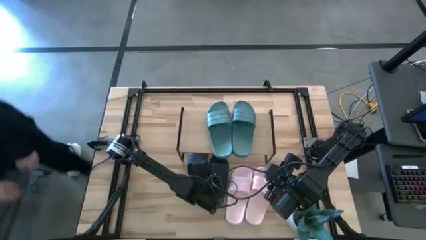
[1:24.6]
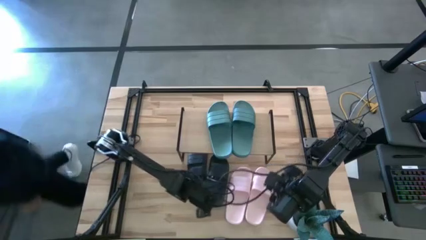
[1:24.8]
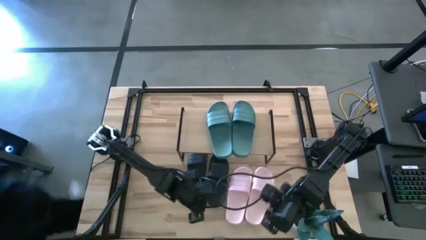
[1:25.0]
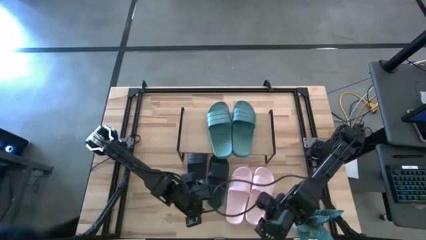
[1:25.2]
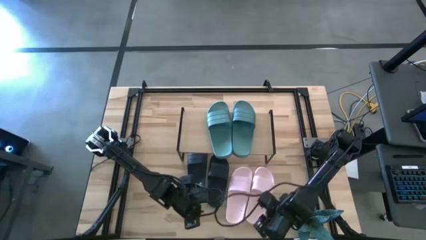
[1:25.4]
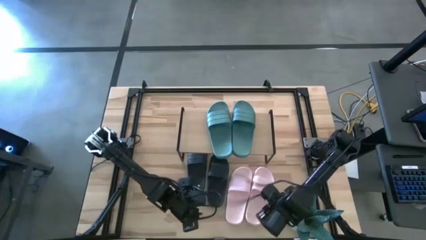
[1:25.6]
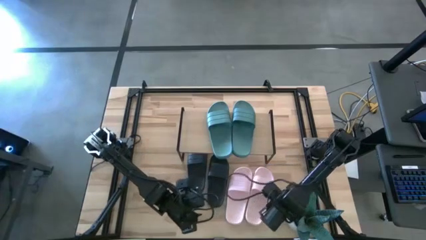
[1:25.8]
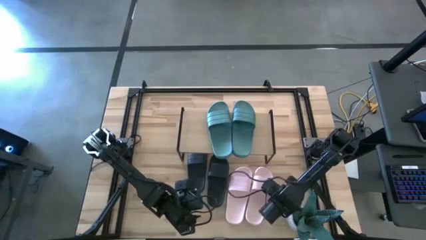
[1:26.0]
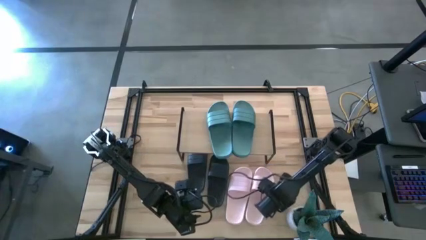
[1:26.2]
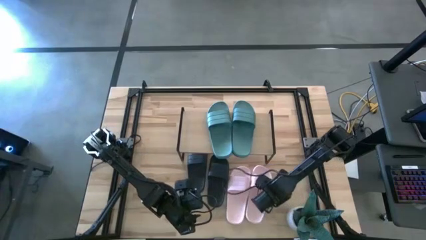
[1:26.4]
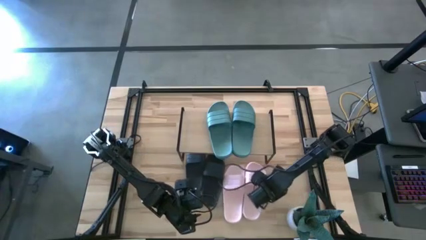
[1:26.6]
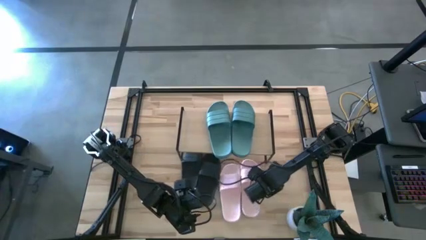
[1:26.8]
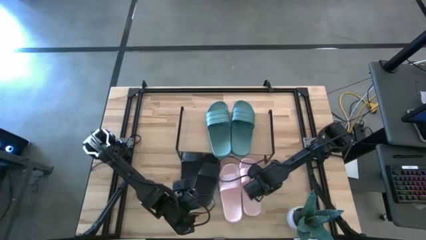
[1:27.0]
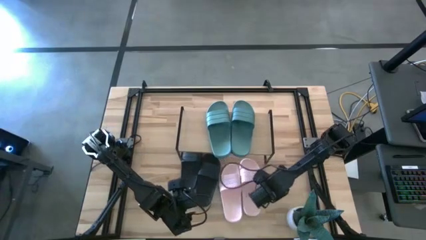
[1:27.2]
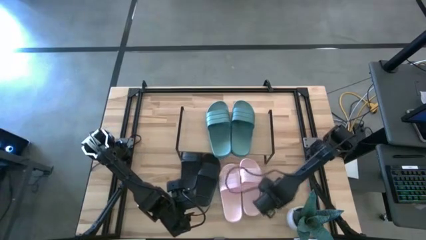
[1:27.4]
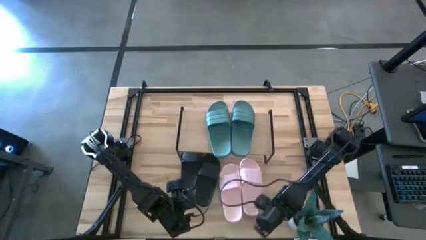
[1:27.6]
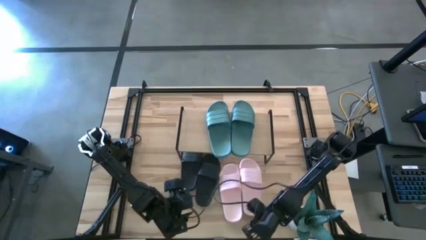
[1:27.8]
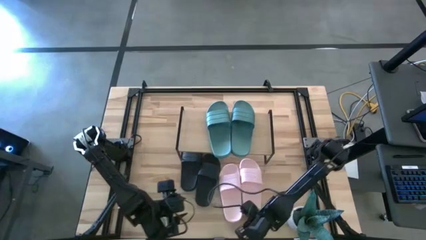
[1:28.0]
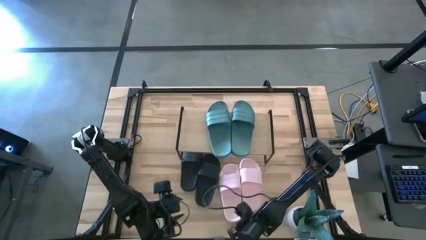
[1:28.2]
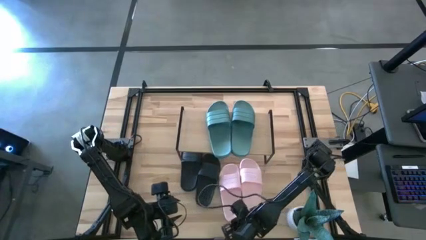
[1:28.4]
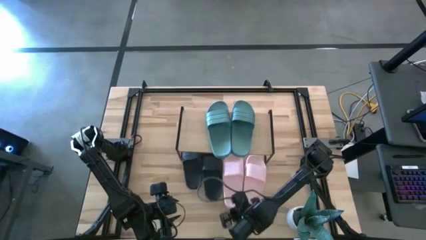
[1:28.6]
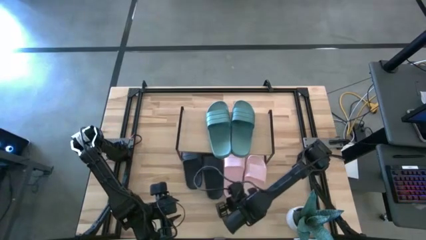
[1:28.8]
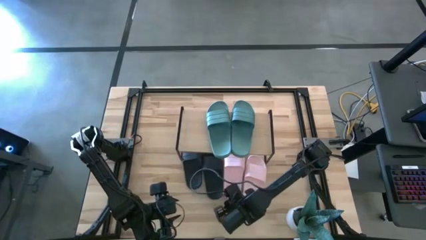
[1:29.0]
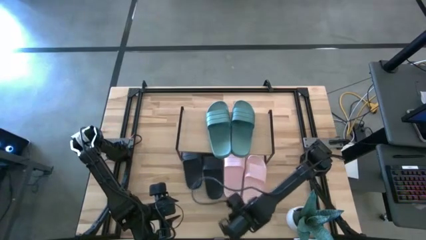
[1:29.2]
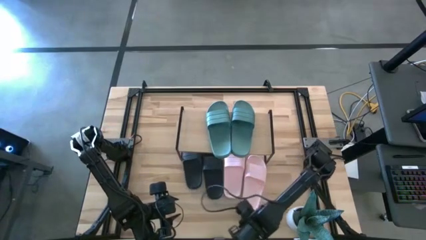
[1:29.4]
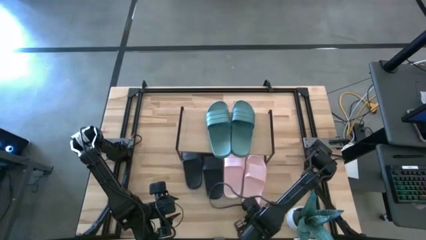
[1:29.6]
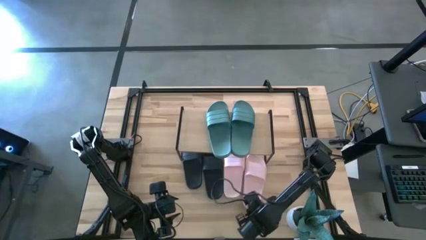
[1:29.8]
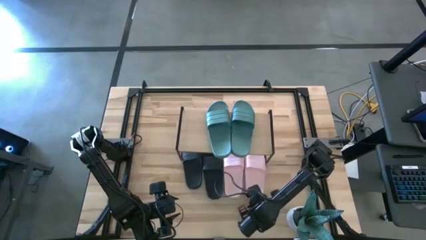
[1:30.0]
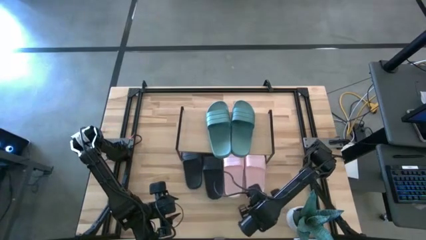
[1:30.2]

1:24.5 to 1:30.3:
Task: Pick and place slides into the shelf
Adjust the pink slippers under the table

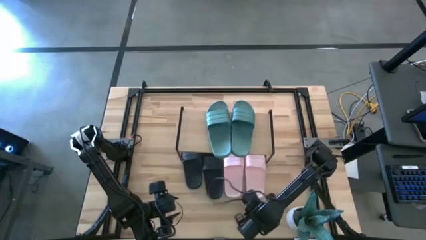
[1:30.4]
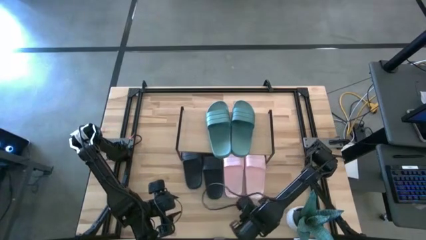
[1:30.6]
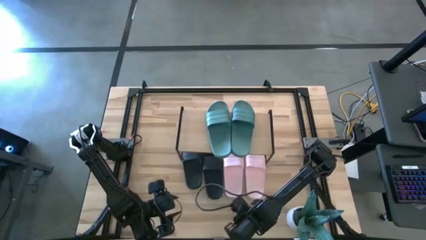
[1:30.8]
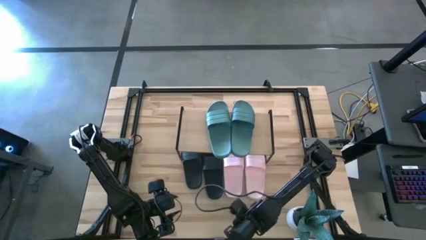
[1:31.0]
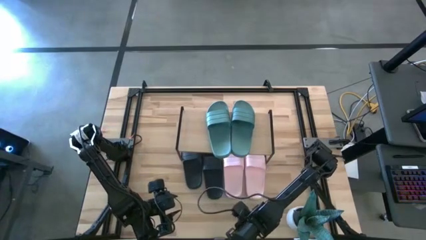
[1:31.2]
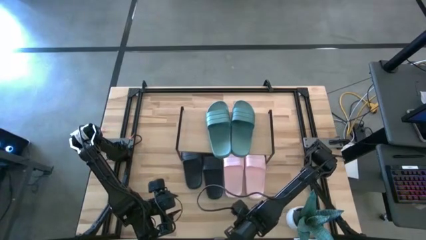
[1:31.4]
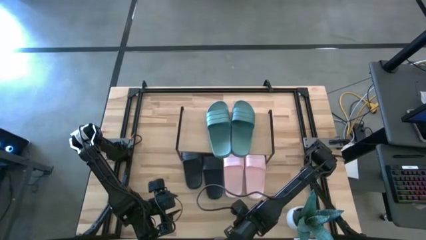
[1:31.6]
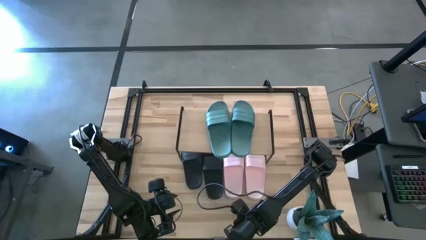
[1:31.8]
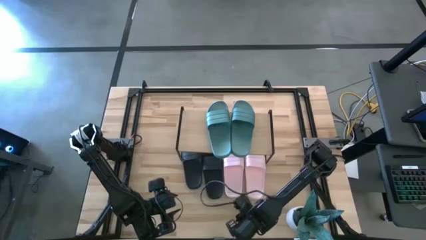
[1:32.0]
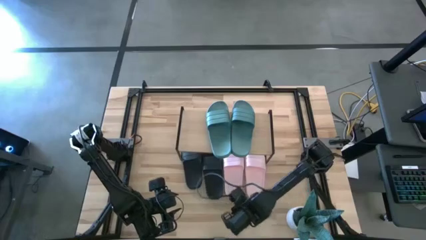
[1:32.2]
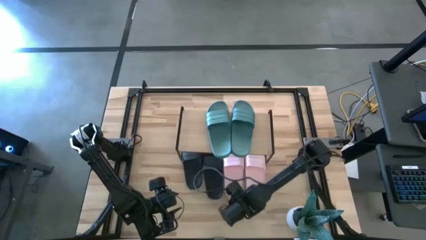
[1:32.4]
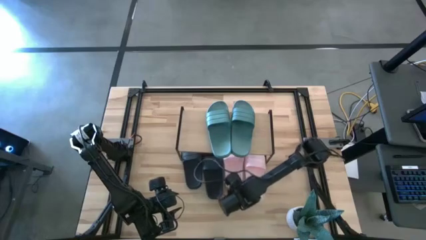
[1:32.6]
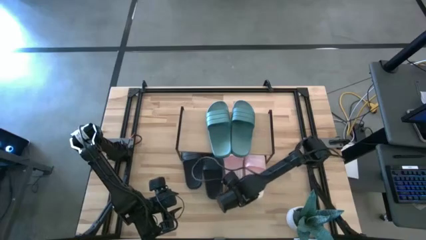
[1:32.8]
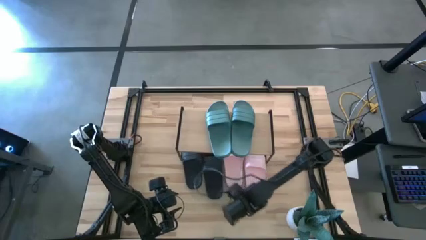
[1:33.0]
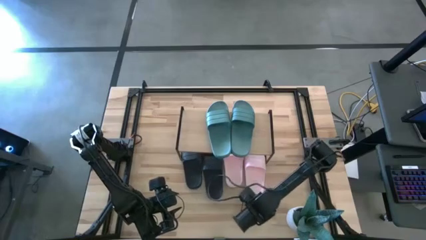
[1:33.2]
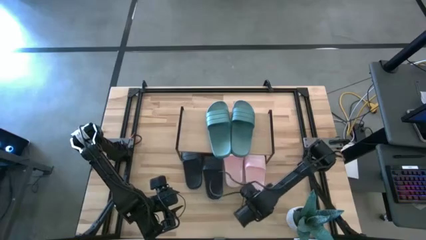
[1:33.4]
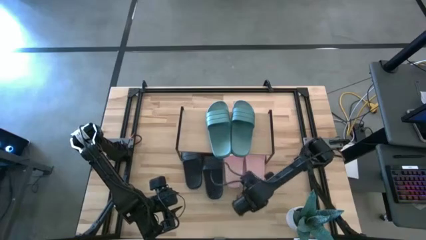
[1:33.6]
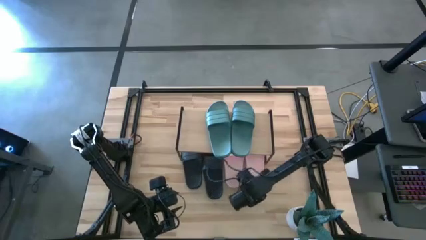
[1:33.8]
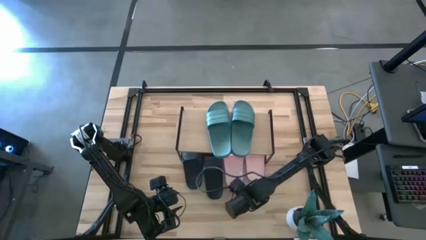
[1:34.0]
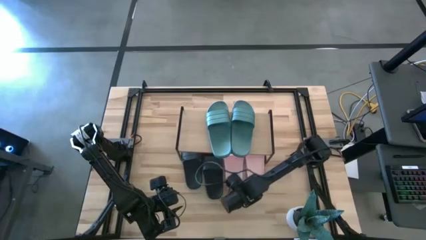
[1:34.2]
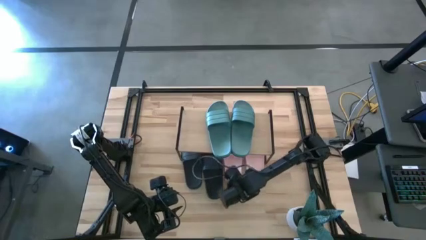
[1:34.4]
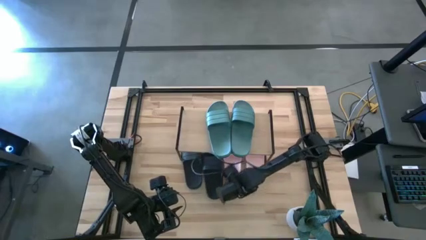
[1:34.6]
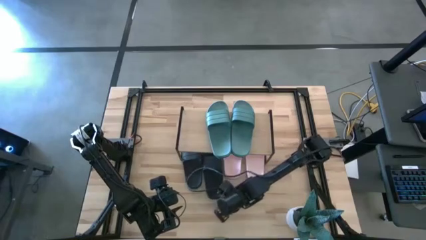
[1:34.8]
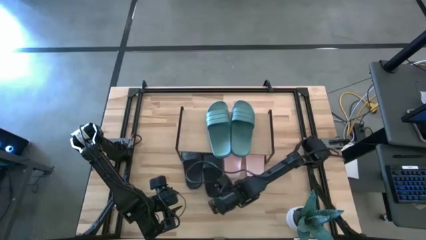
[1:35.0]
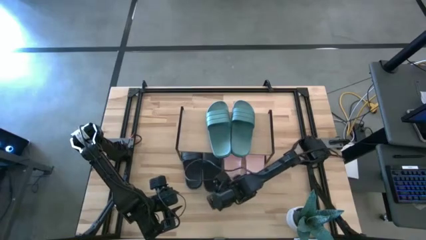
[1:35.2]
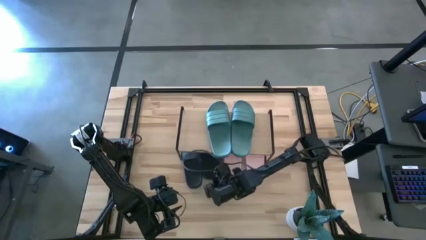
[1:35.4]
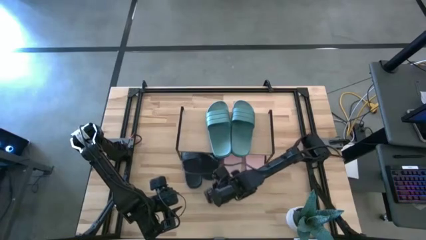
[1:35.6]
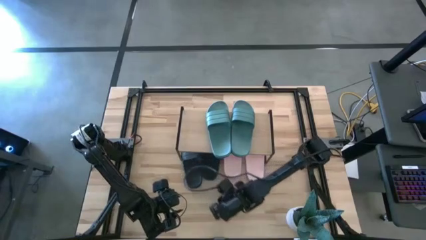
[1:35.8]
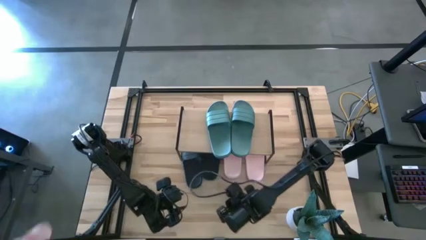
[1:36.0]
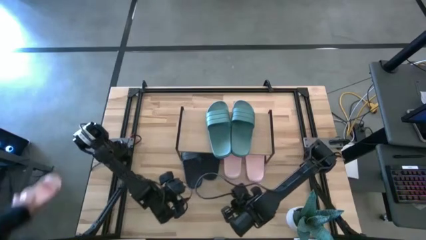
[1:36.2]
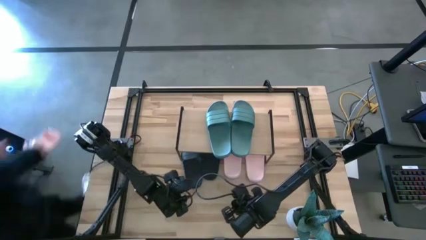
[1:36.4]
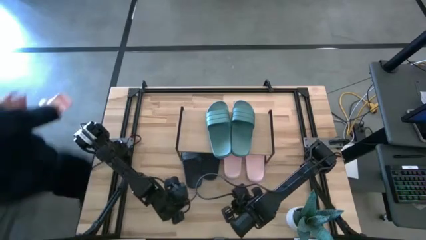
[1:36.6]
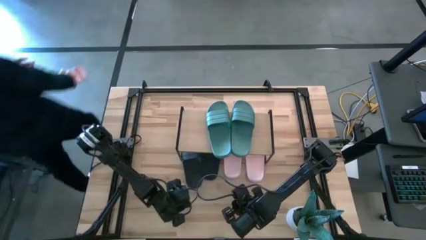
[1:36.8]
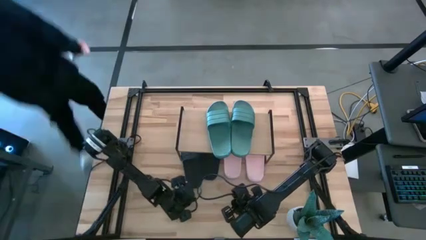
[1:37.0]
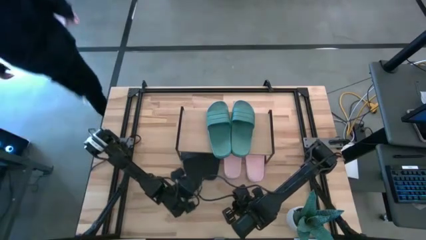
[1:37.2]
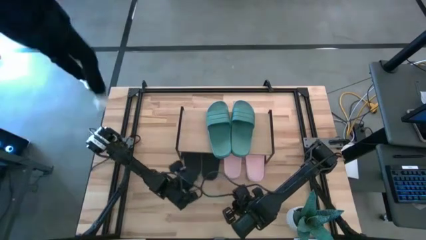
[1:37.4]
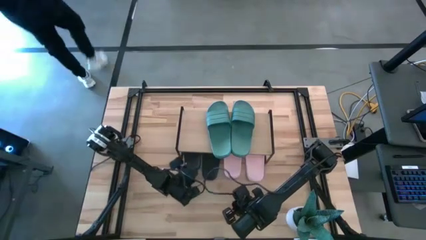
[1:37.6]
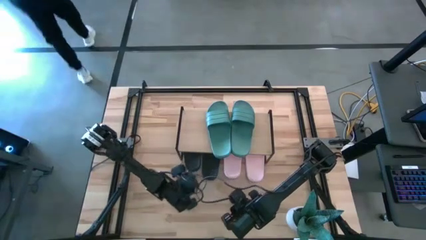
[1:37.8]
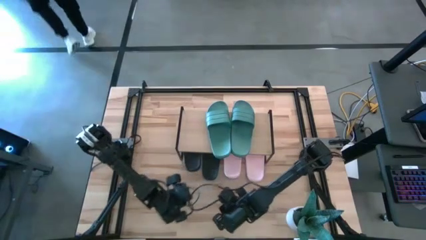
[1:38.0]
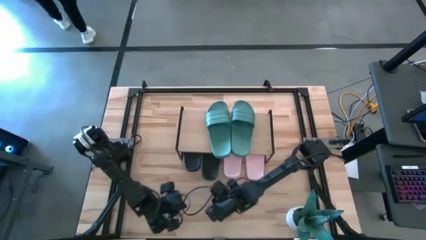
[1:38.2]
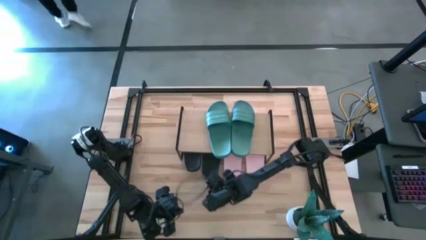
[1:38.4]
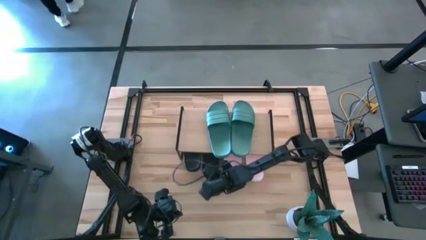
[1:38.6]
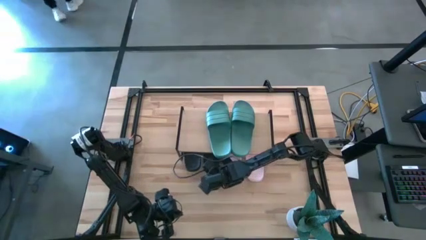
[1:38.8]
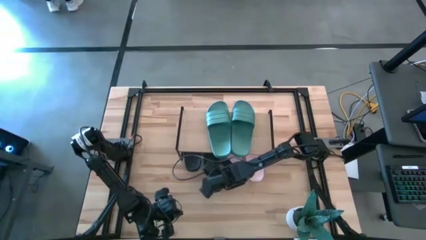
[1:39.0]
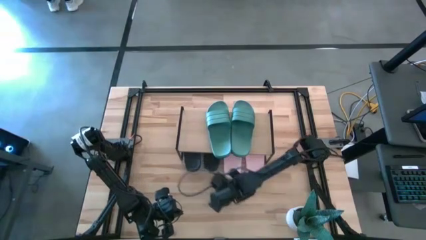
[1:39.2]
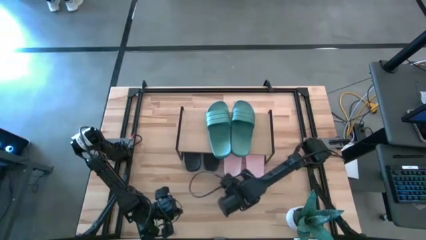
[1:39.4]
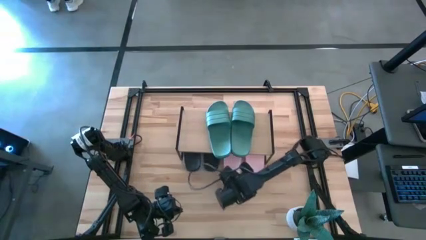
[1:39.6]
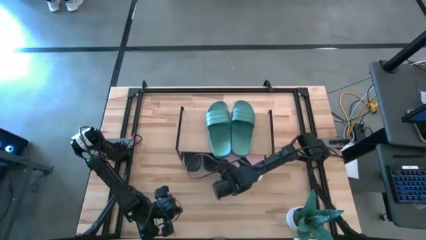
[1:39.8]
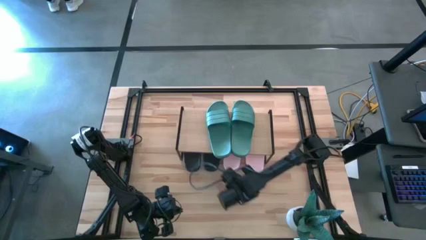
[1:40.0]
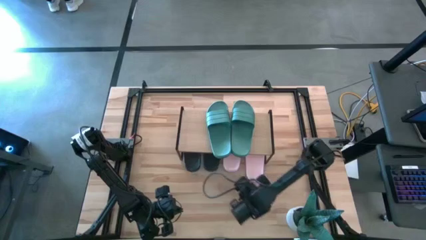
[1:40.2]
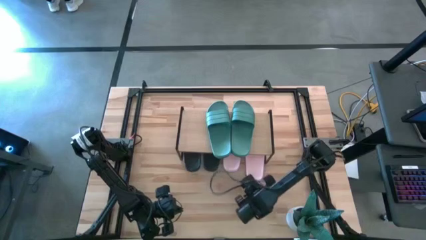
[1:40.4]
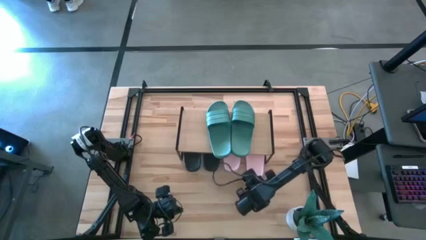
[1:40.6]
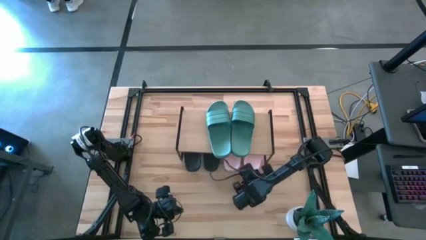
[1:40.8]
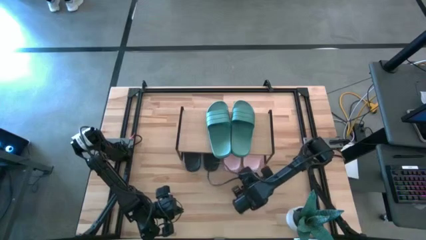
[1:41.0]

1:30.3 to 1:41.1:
Adjust the slippers under the shelf
